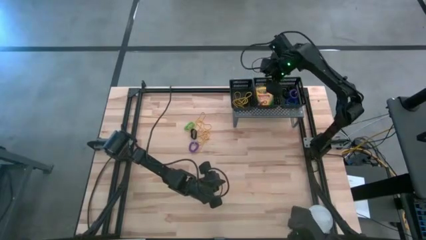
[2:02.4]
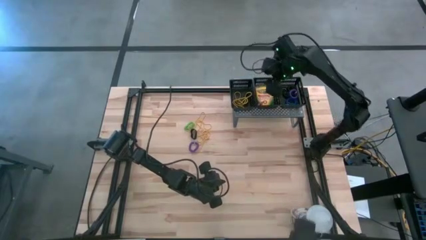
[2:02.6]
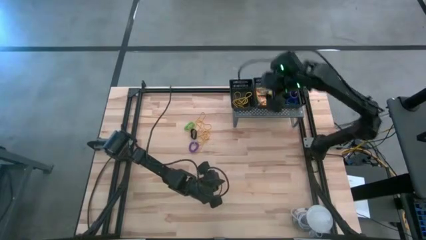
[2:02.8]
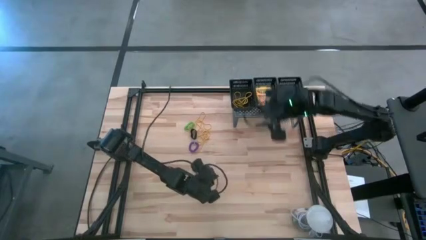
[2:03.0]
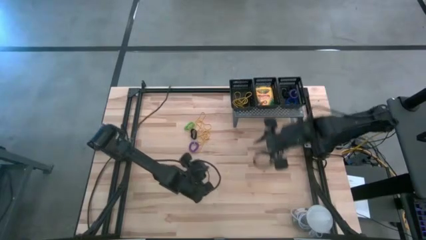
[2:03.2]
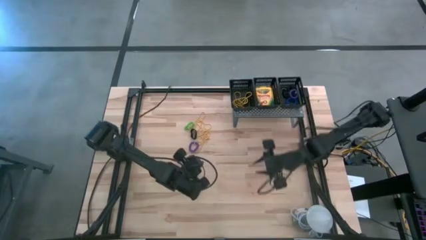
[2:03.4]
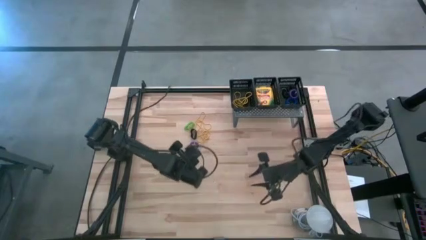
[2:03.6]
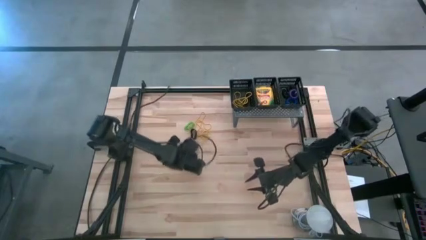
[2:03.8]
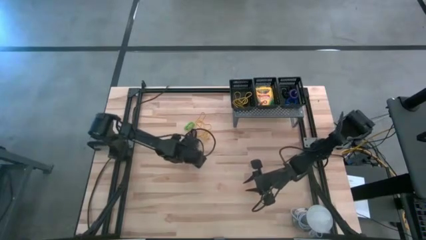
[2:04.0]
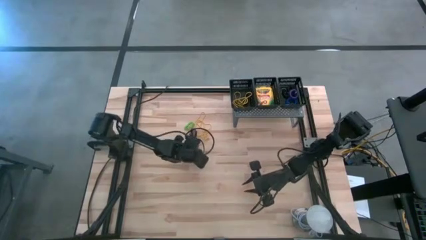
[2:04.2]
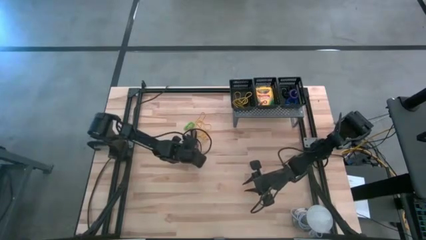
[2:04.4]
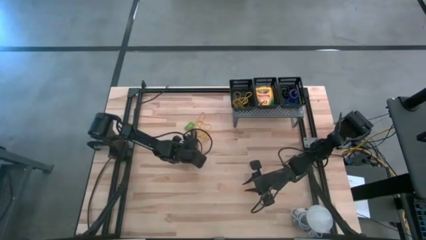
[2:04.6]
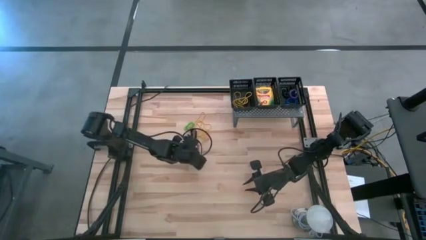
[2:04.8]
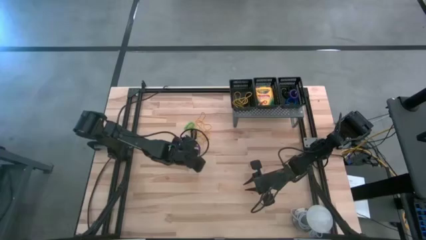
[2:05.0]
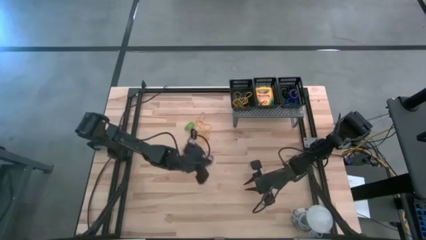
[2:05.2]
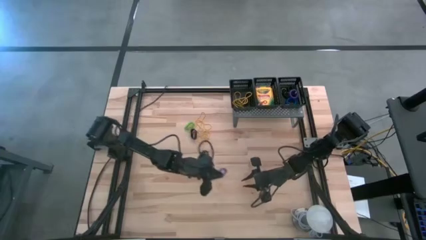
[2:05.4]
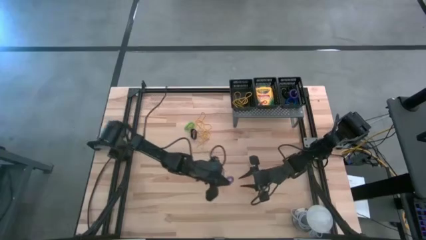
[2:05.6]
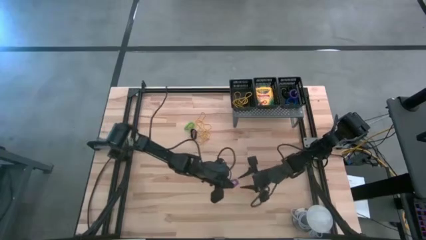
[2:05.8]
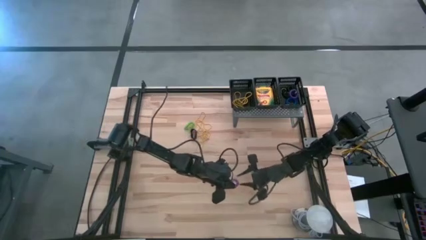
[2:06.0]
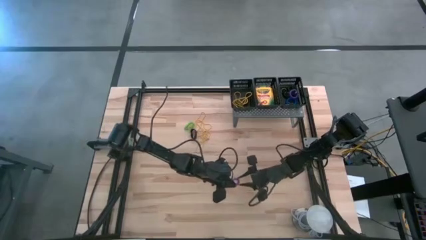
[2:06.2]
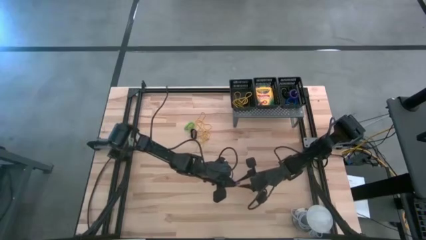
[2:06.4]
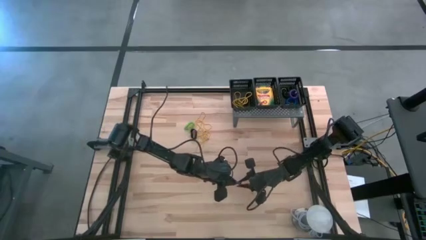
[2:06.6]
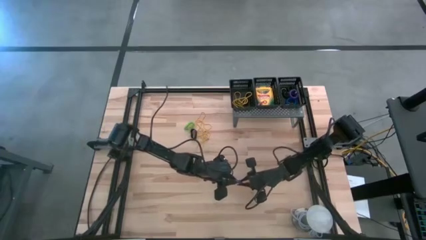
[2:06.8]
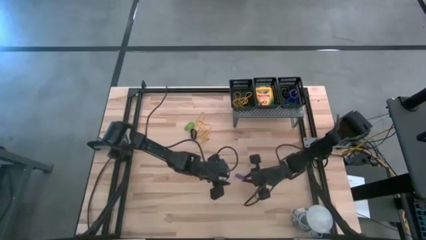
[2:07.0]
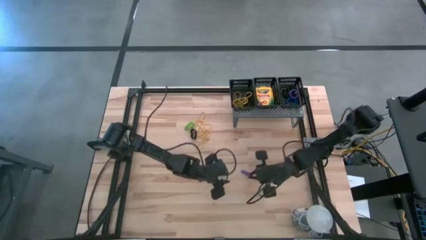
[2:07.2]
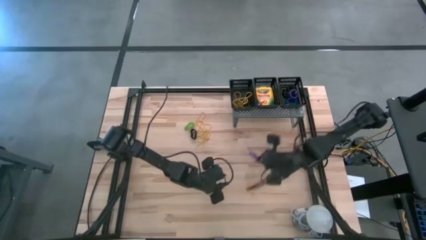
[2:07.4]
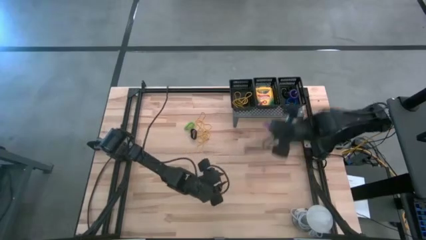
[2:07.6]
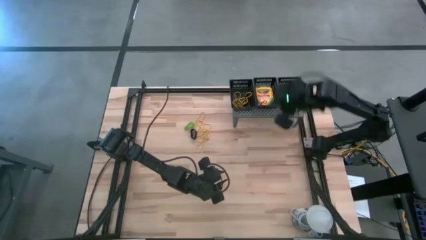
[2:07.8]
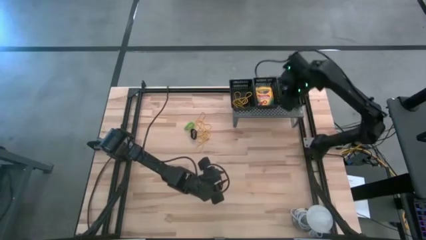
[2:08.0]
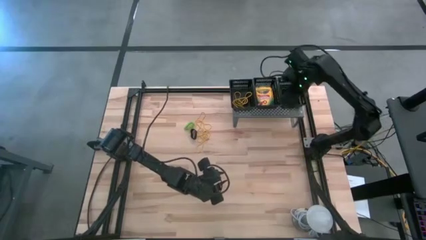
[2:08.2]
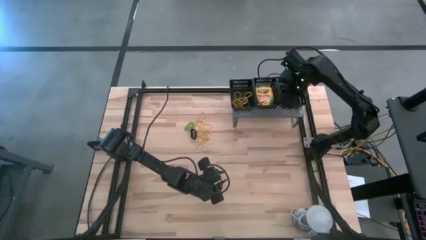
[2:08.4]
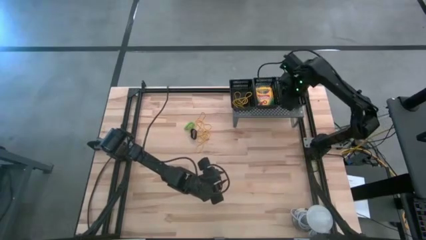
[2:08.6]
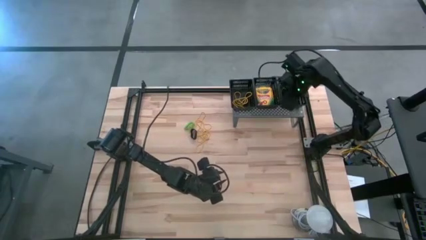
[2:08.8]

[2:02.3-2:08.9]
Task: Pick & Place Office Desk Supplies
Put the purple spring keychain into the right black basket on the shelf

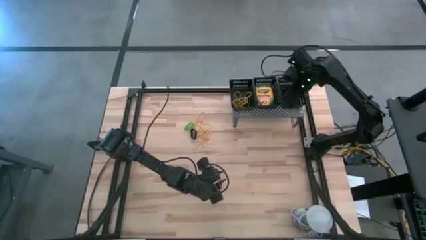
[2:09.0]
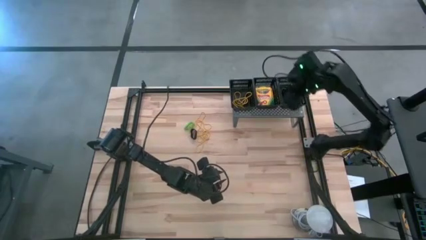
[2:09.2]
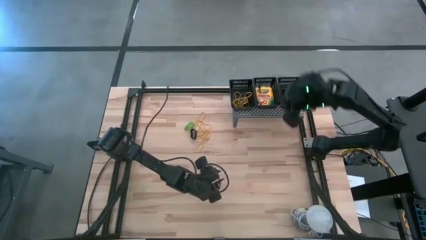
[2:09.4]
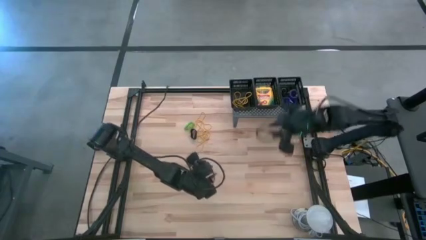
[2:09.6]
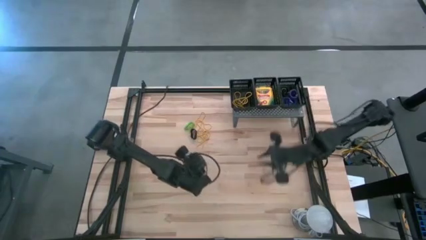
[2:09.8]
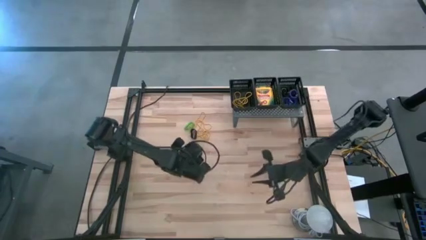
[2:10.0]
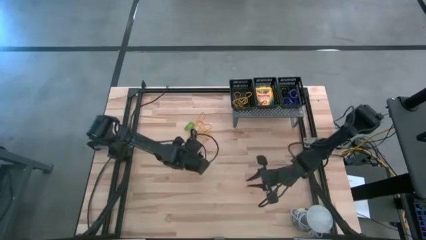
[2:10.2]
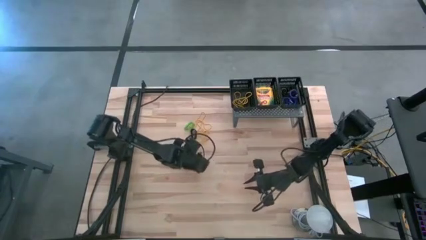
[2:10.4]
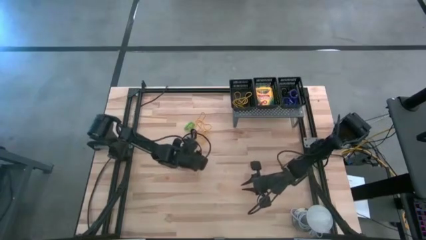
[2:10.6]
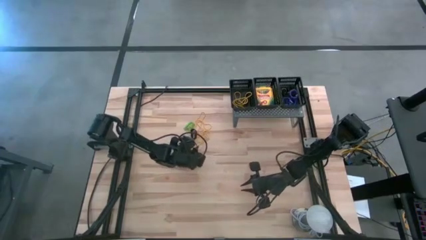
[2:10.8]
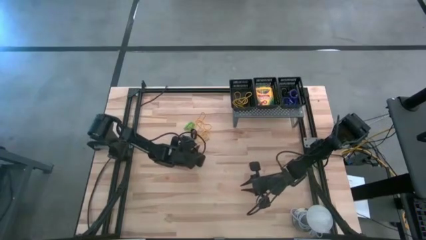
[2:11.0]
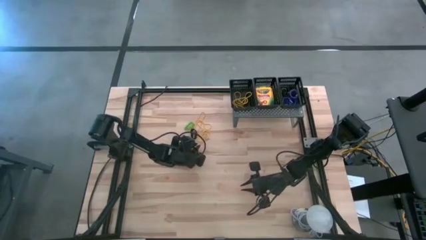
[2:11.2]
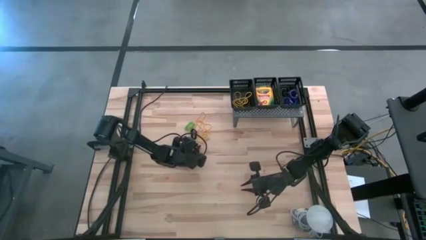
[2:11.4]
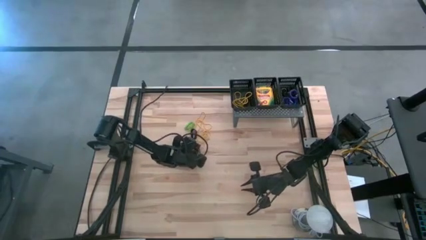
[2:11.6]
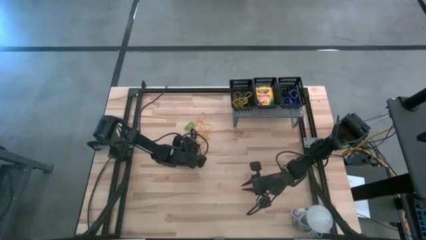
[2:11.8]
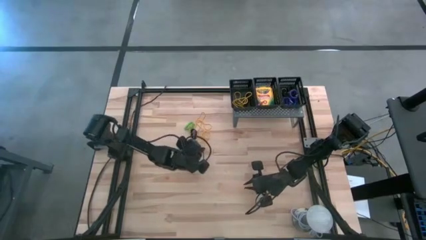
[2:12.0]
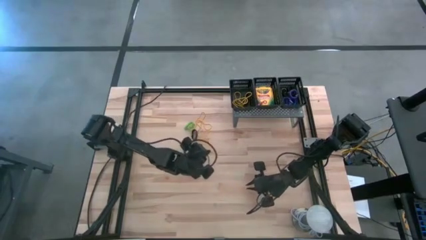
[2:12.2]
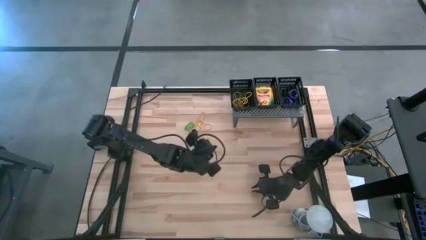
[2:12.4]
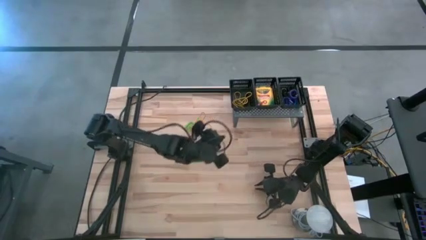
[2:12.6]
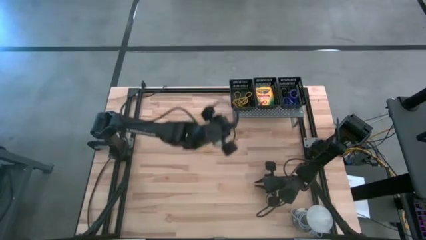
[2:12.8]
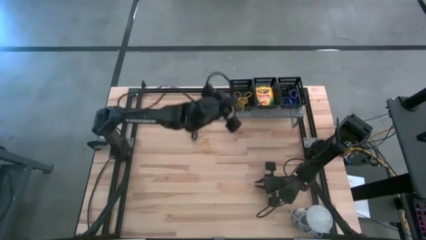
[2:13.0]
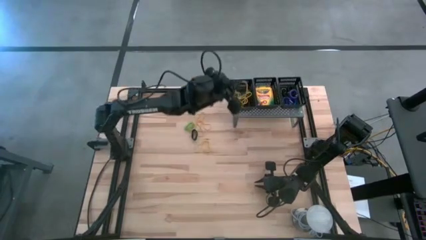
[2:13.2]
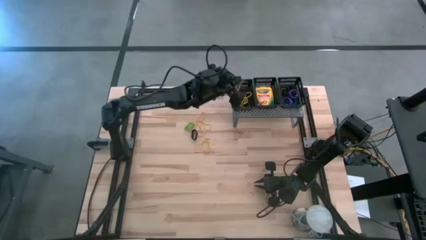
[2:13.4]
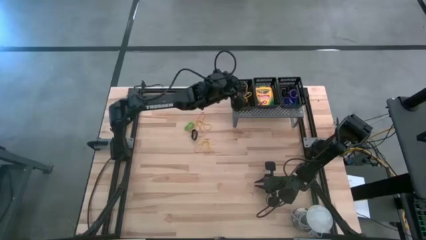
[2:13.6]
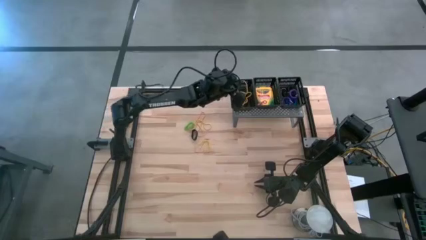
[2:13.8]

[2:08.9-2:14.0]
Put the yellow rubber band into the left black basket on the shelf

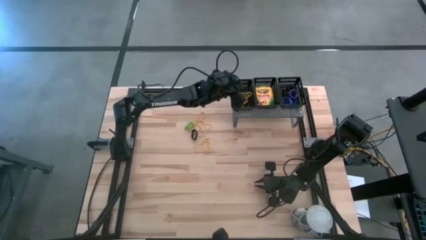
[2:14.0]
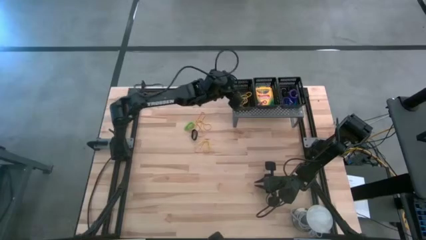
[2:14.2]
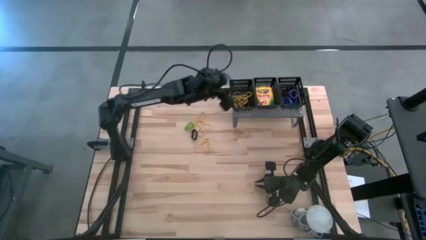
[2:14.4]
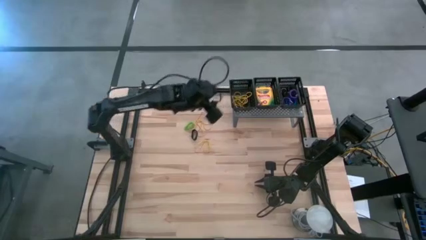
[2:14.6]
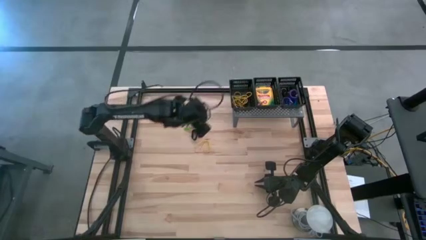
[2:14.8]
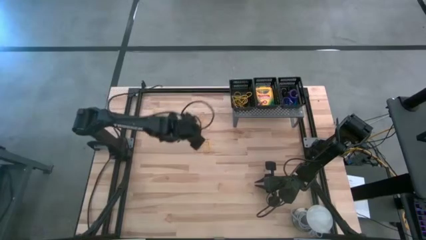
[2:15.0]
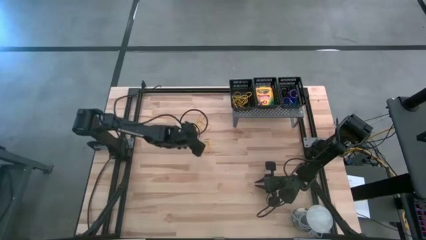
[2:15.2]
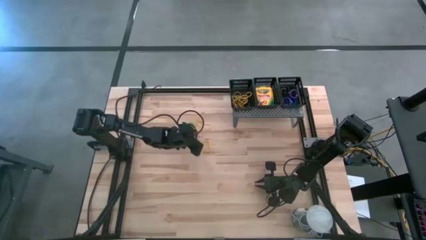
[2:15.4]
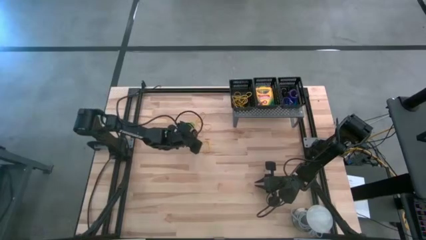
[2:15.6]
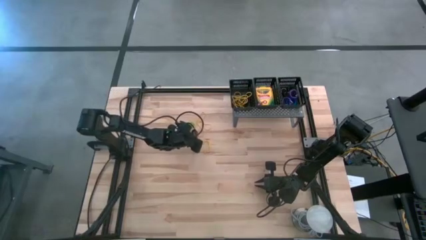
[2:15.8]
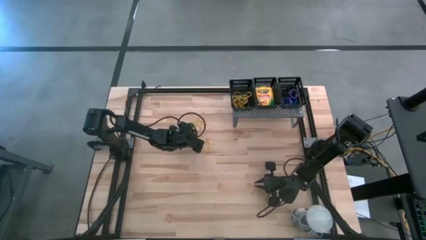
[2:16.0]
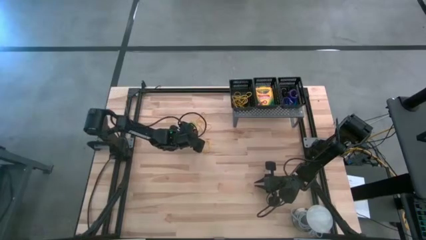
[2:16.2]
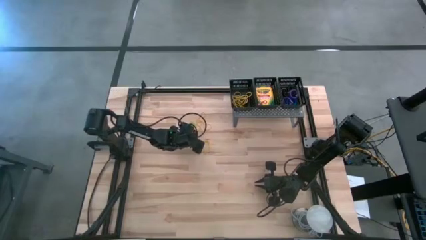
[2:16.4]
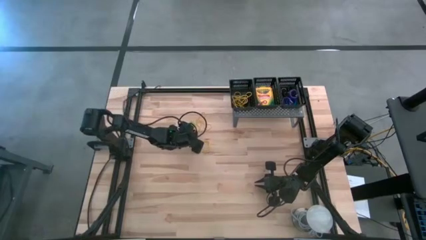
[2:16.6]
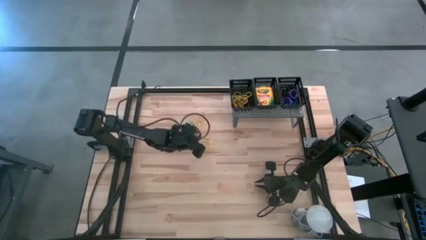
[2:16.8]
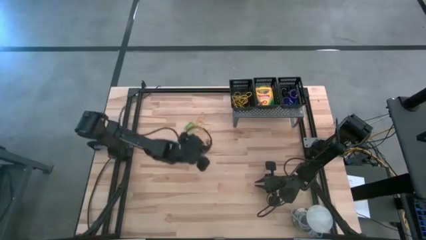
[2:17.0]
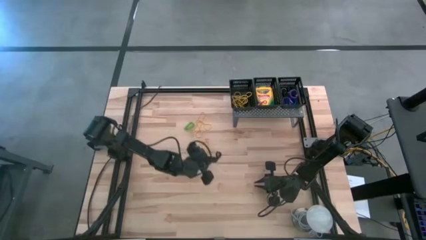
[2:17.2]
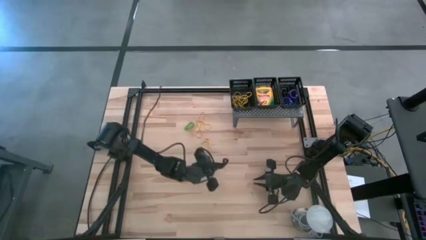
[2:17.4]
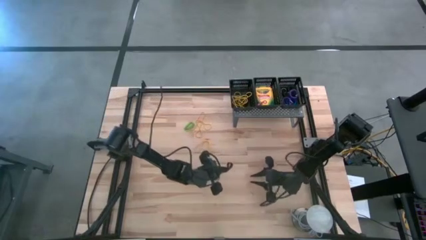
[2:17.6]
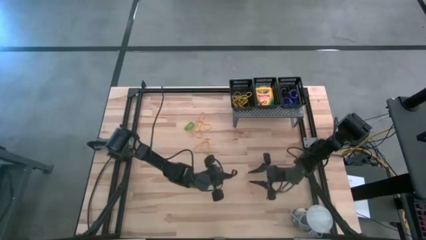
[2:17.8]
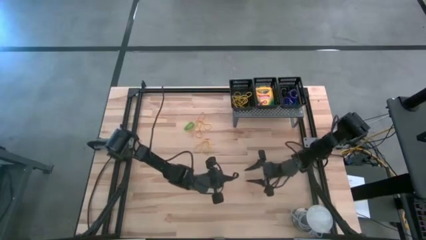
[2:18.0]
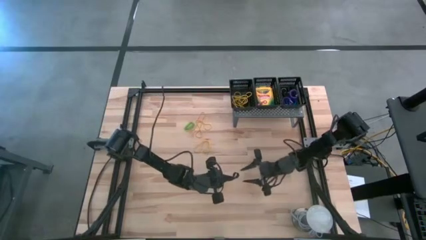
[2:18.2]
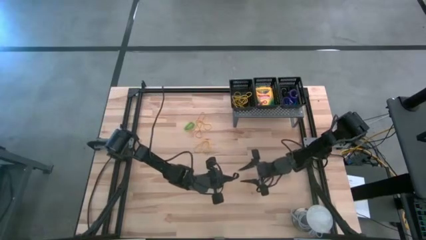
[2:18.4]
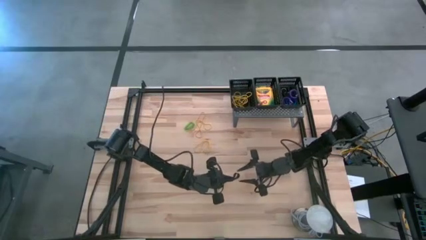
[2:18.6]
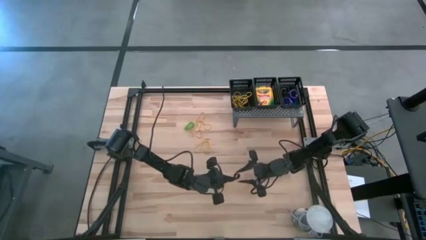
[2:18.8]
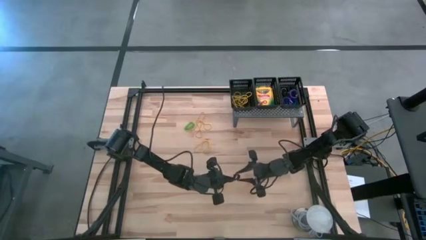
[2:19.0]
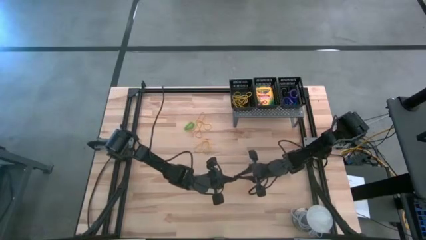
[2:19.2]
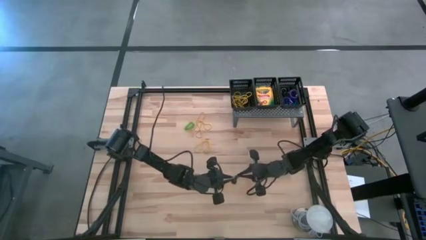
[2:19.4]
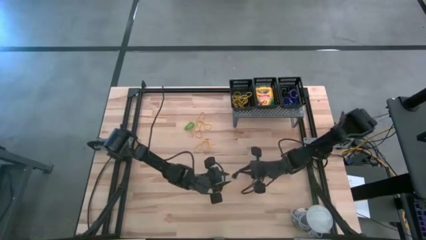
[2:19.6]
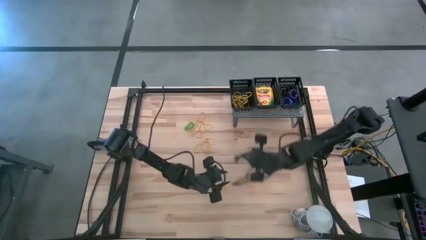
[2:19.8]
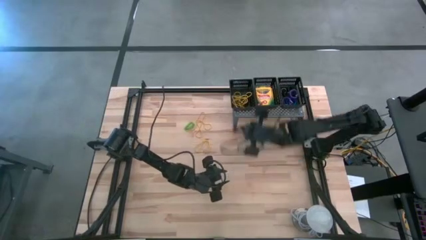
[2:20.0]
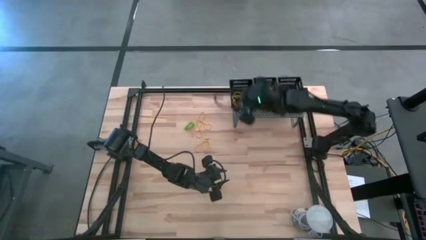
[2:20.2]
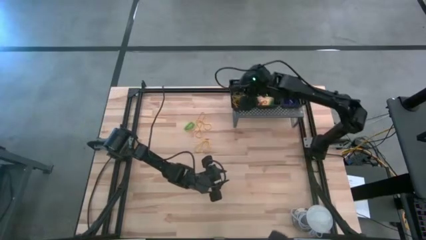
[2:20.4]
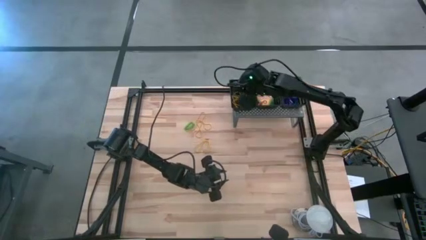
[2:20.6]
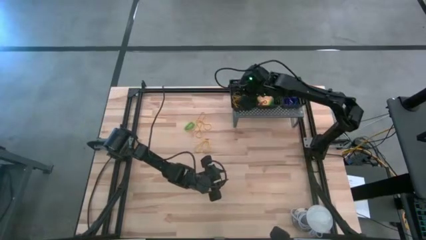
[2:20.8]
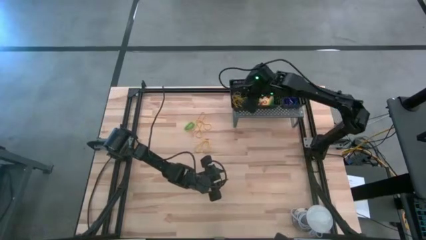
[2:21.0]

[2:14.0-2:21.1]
Put the black rubber band into the left black basket on the shelf
